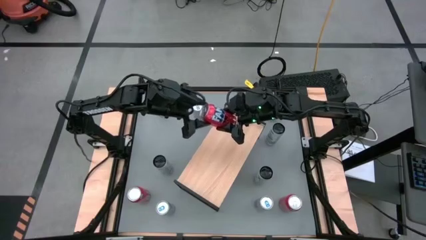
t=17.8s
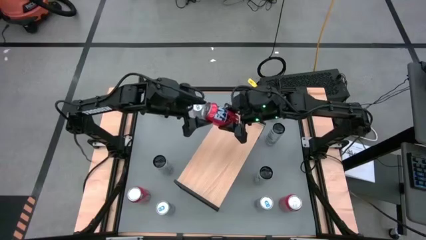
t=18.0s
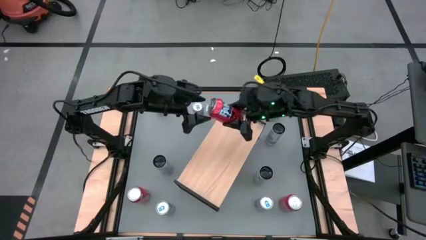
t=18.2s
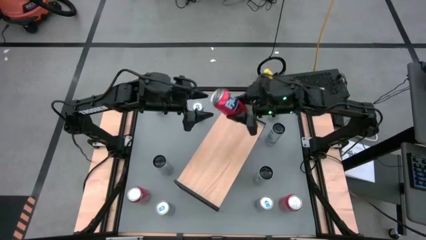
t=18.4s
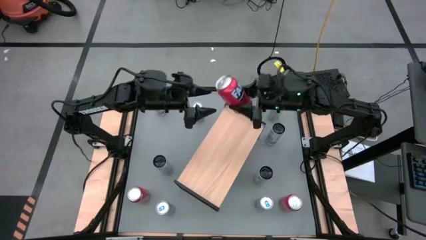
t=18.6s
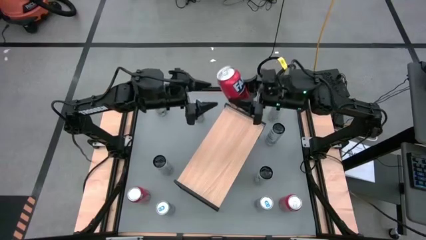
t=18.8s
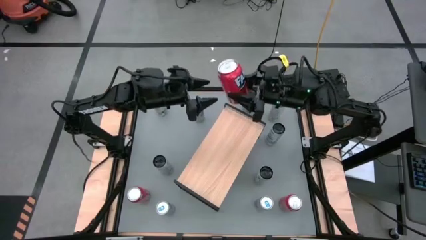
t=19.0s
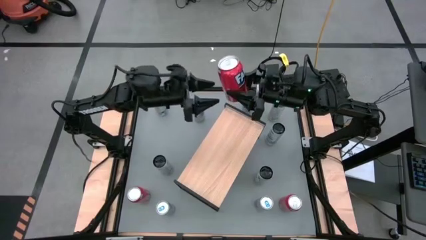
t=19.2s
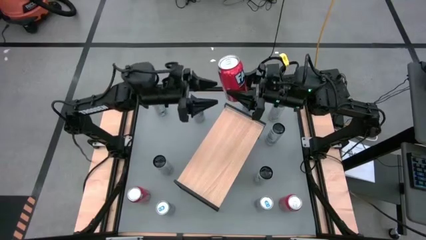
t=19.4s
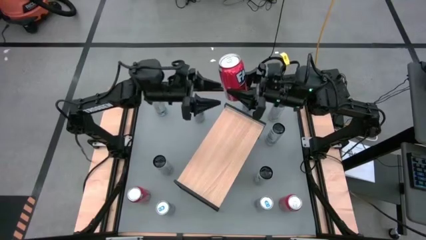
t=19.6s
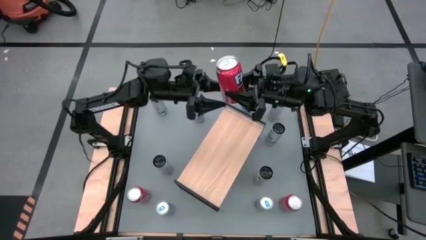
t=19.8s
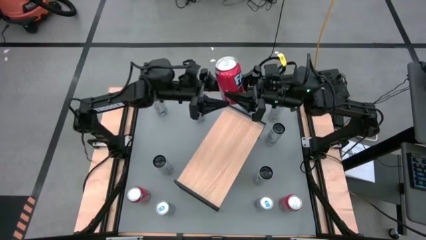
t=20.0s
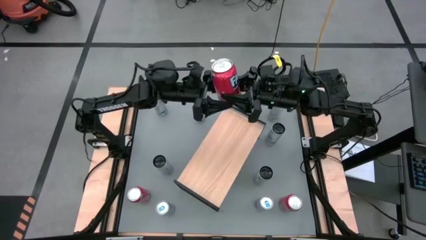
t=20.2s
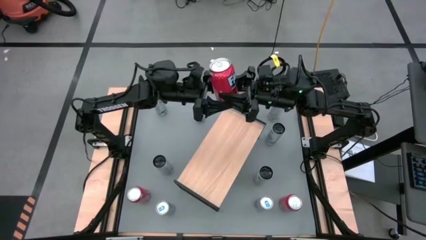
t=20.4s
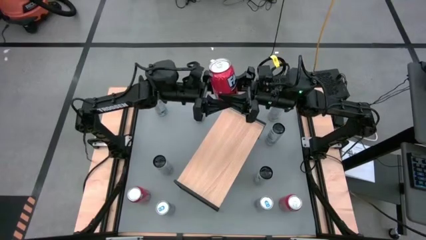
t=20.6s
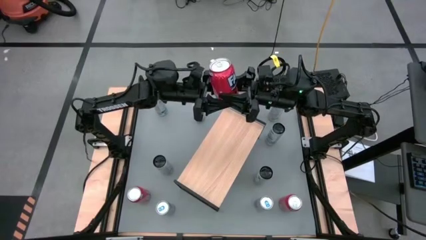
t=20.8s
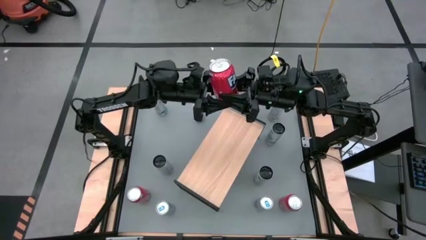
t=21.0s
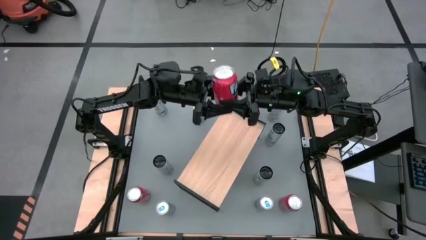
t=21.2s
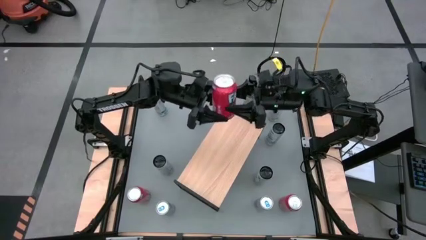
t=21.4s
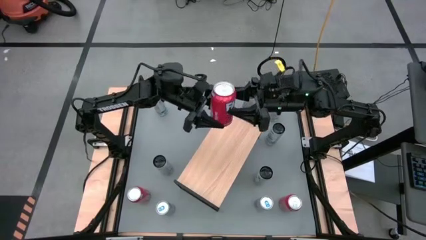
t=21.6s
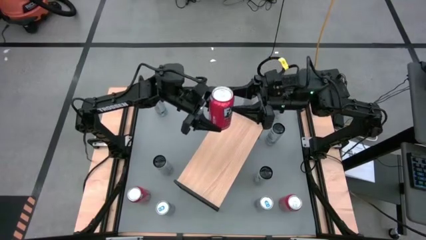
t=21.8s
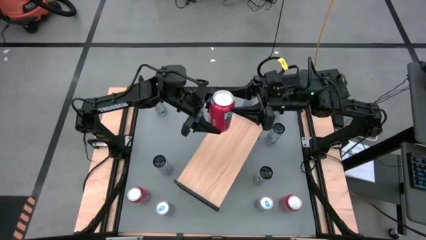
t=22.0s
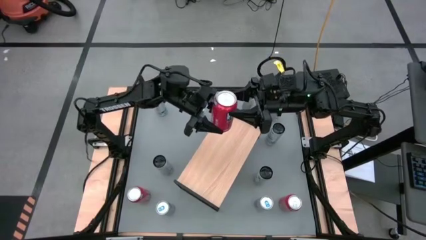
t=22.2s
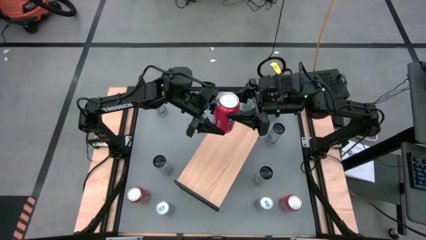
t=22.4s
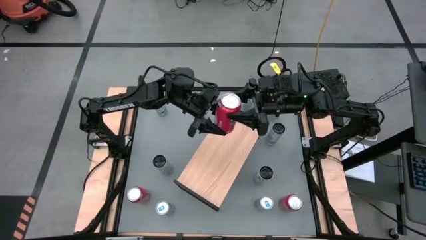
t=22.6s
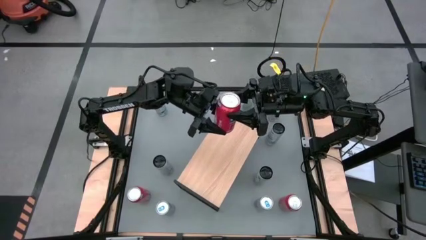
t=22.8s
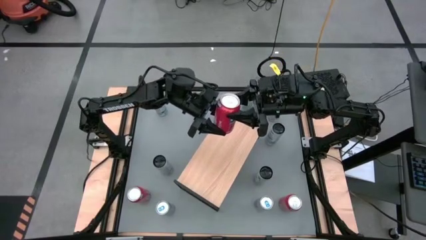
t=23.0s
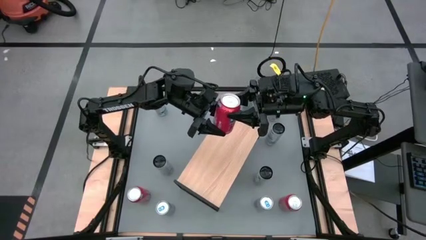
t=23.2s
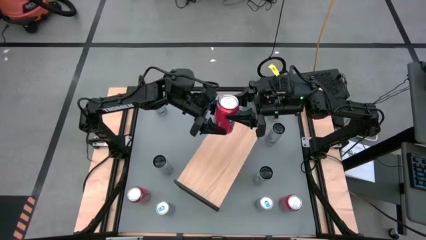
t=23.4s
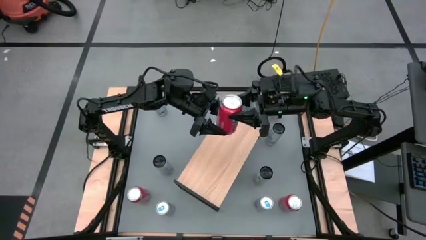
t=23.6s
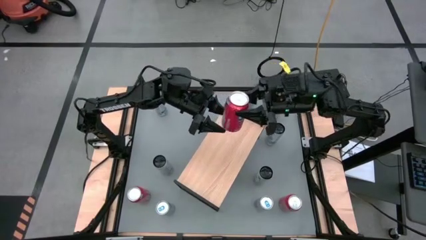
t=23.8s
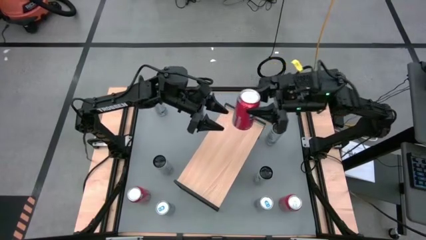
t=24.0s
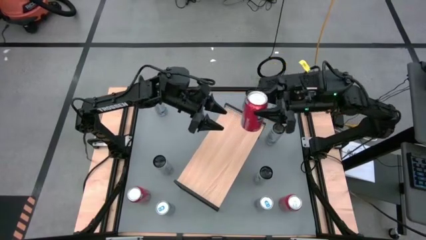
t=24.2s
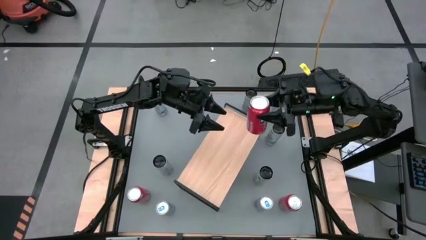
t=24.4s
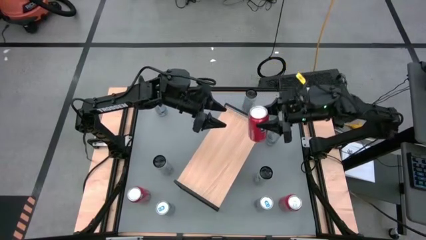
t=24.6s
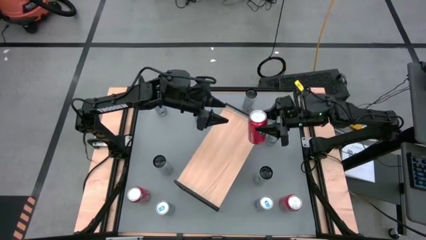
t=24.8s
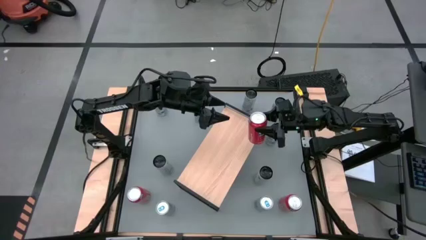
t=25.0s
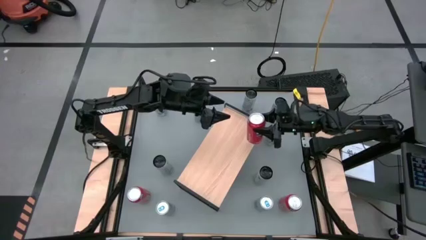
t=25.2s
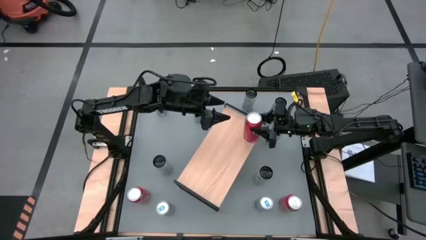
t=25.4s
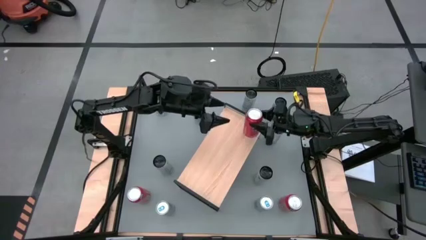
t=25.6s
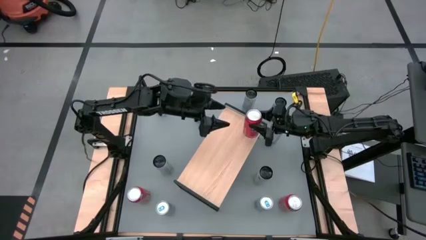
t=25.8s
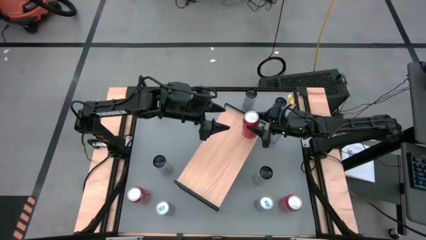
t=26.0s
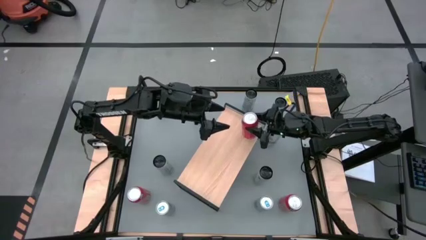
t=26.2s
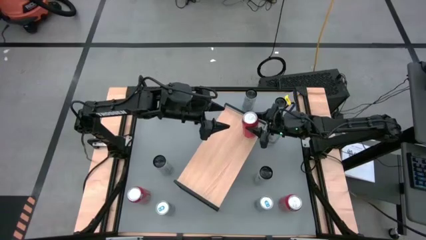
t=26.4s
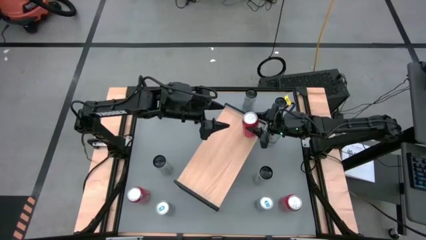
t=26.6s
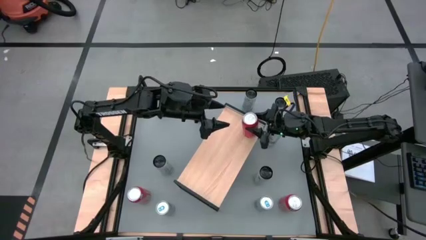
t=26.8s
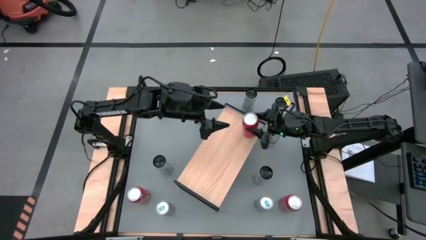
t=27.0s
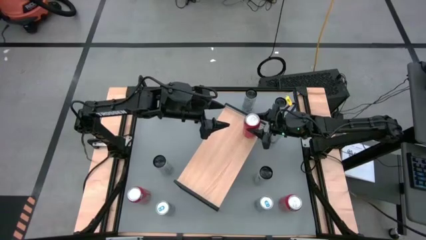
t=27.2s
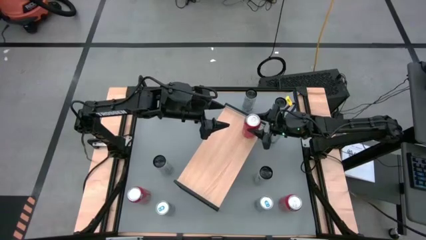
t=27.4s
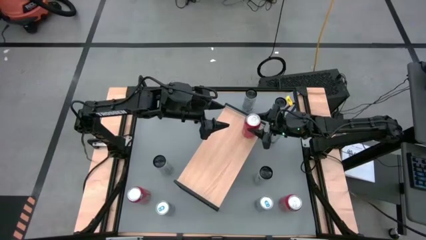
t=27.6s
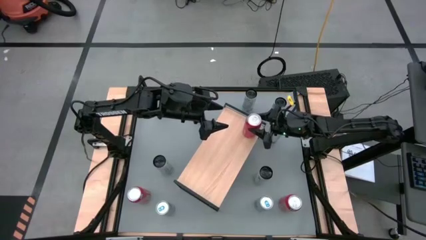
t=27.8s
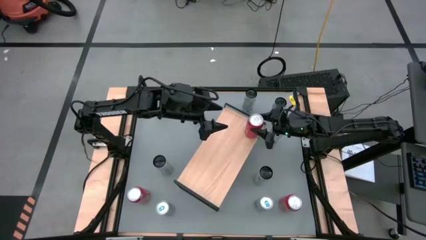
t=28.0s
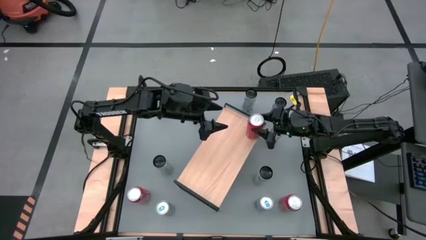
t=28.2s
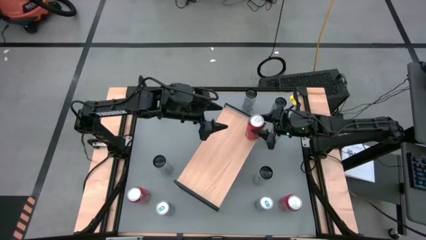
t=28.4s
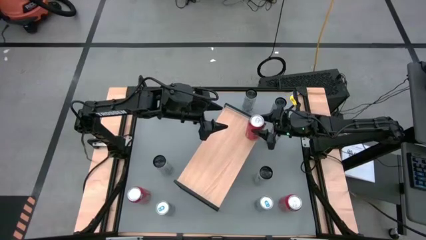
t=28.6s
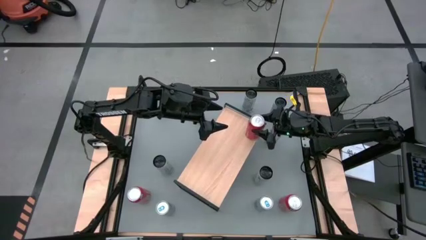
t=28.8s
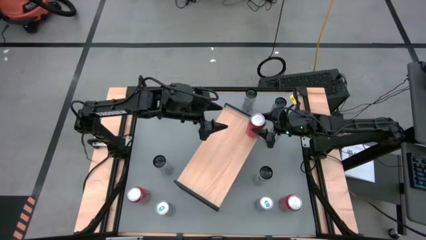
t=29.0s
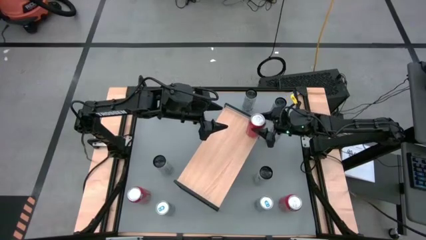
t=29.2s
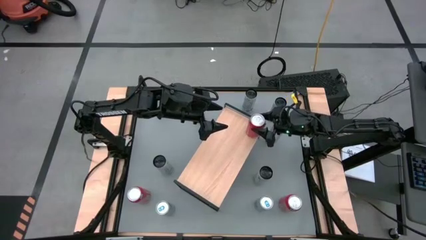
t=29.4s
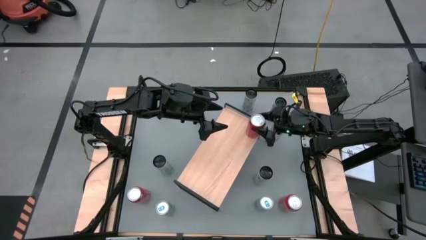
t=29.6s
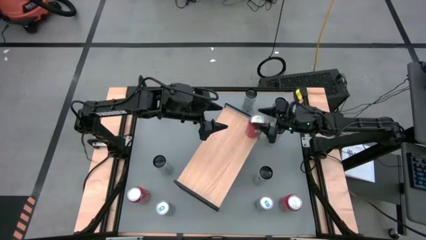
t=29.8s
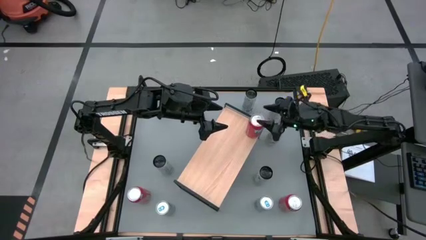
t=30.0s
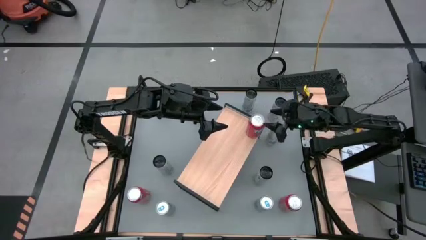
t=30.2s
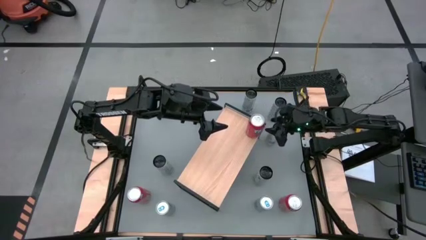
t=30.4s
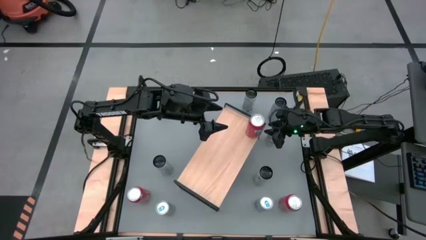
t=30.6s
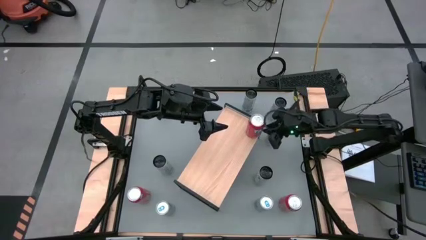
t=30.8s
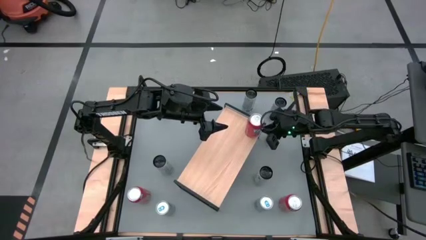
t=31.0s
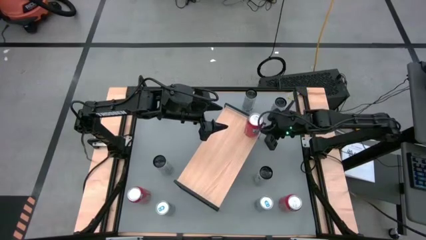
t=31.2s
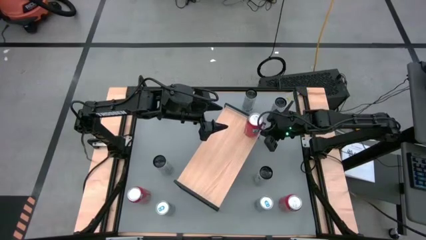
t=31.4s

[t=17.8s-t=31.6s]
Task: Place canned beverage on shelf
Put the red soda can on the shelf
